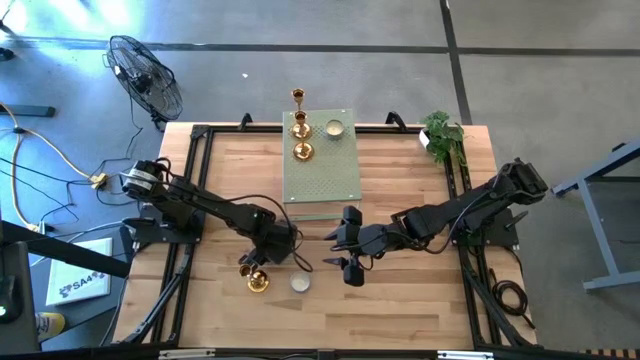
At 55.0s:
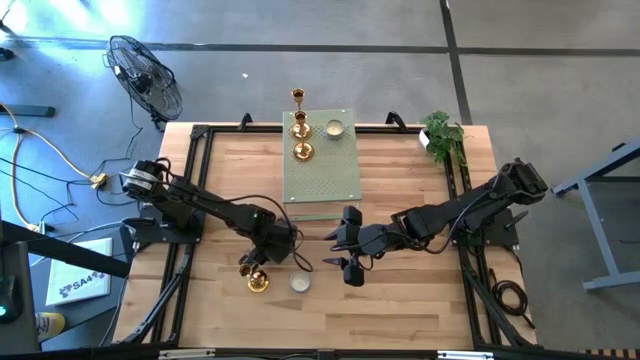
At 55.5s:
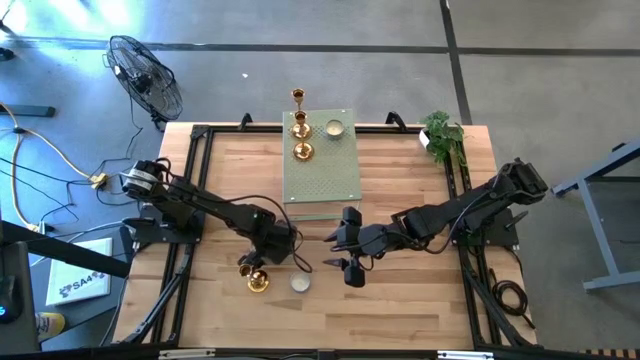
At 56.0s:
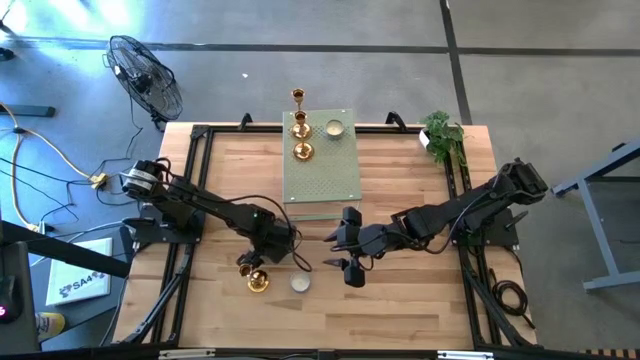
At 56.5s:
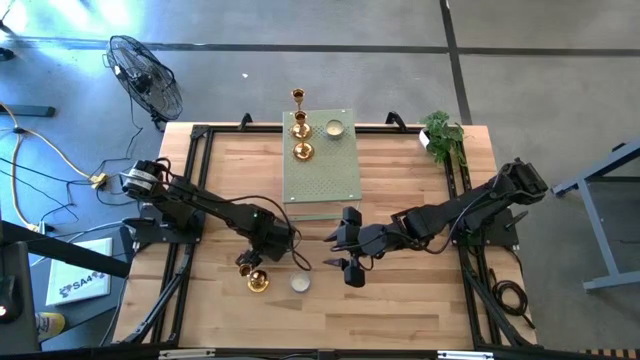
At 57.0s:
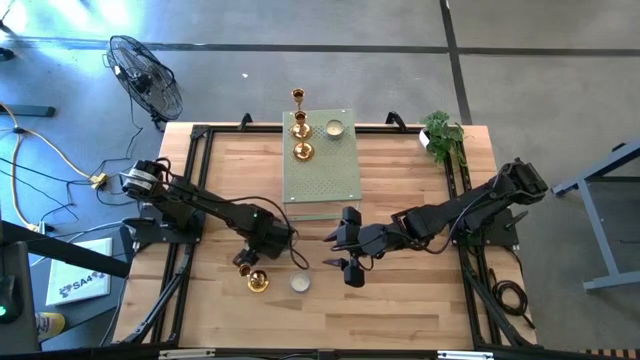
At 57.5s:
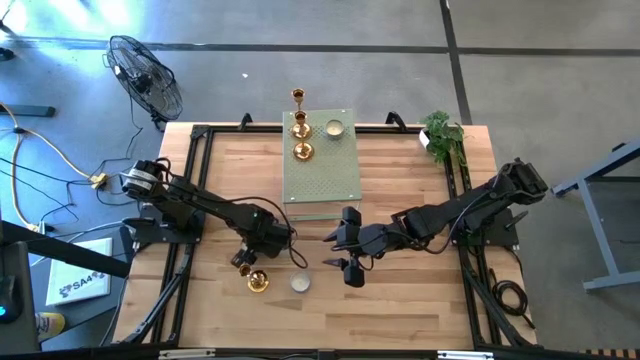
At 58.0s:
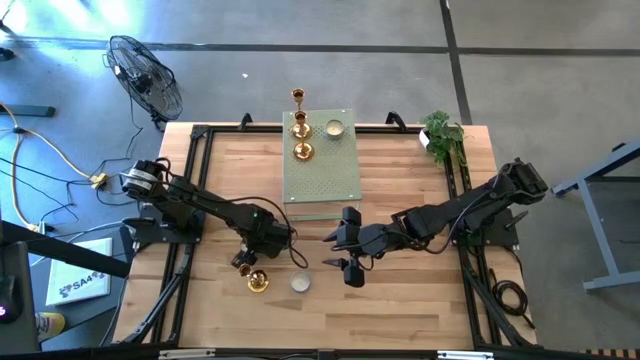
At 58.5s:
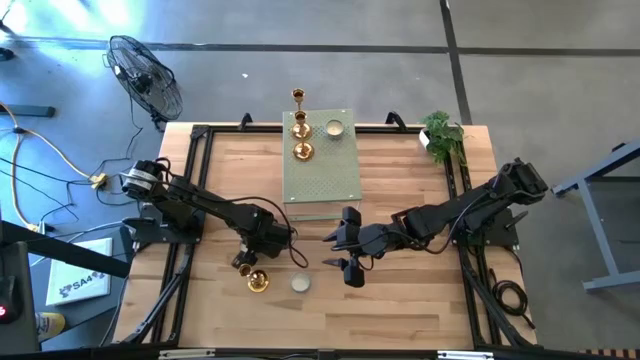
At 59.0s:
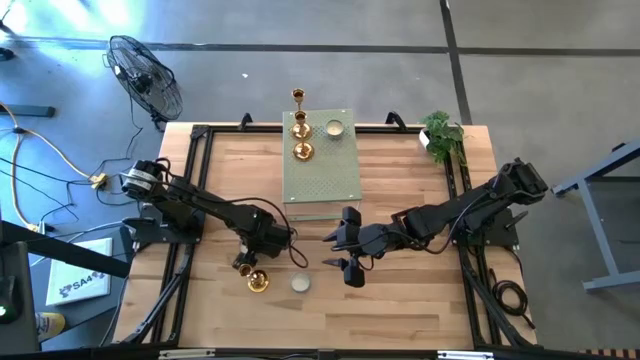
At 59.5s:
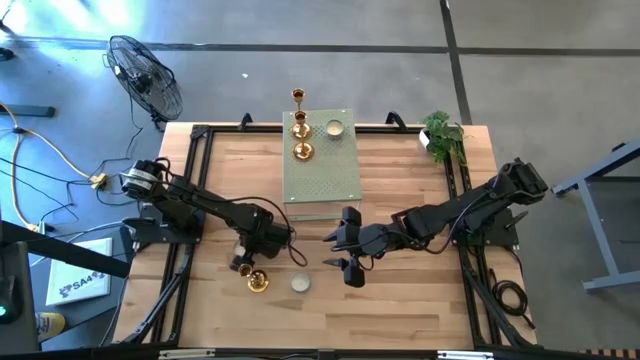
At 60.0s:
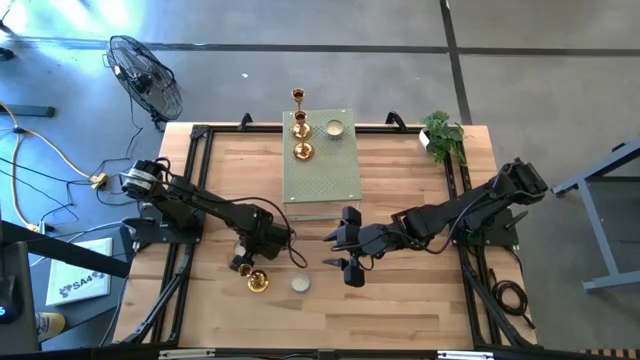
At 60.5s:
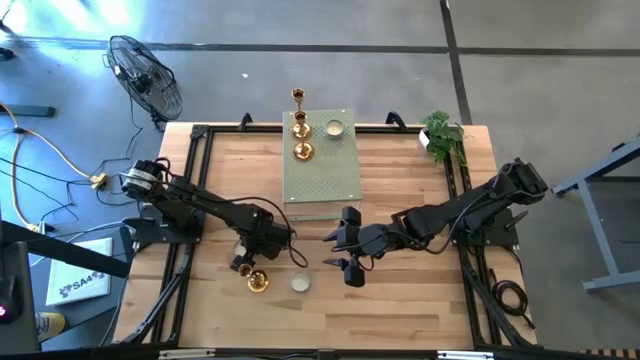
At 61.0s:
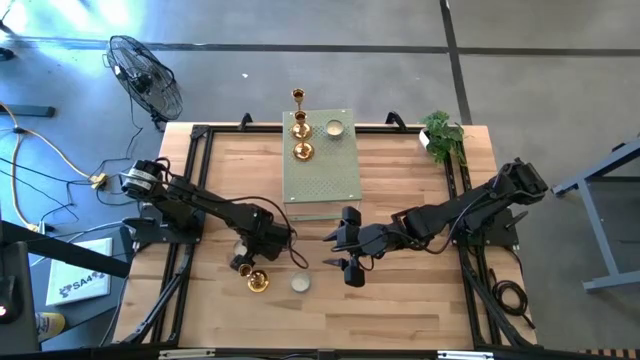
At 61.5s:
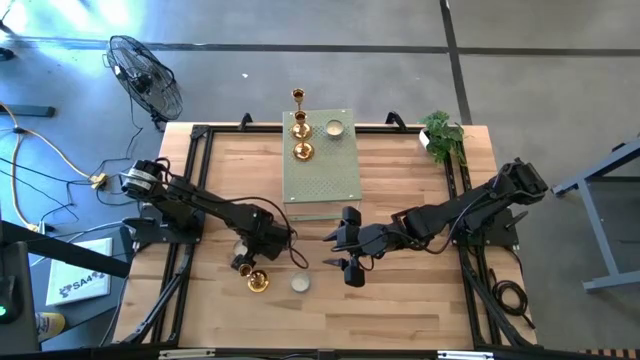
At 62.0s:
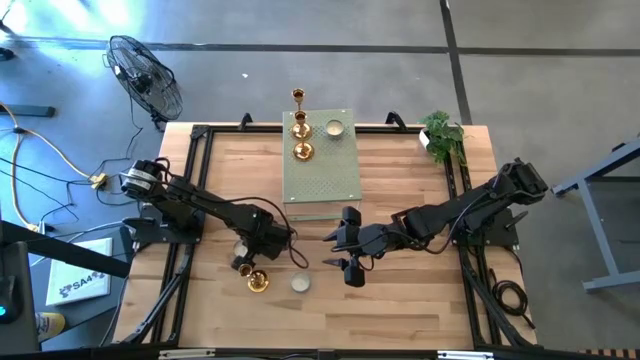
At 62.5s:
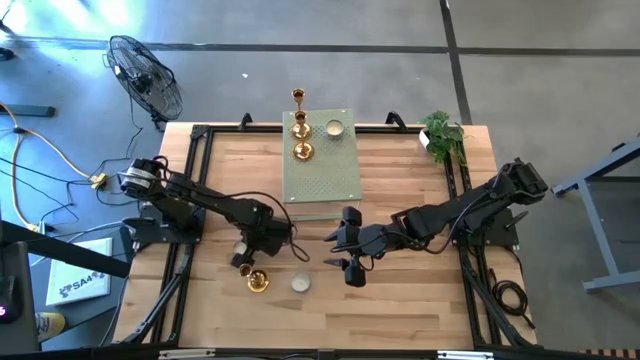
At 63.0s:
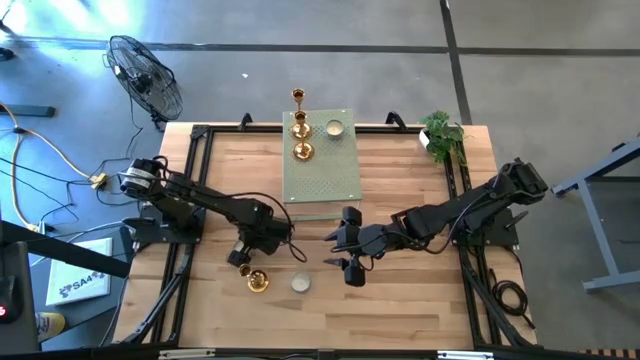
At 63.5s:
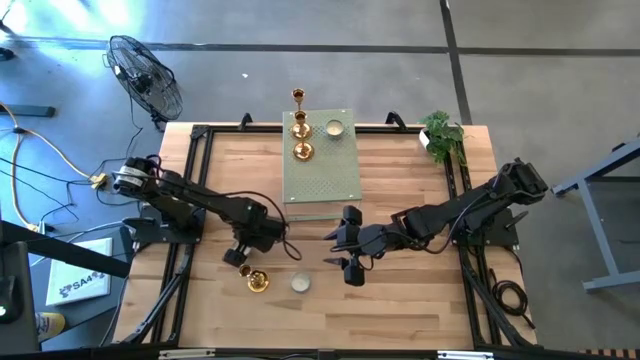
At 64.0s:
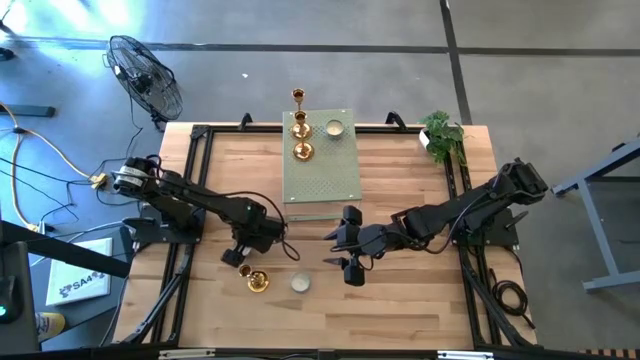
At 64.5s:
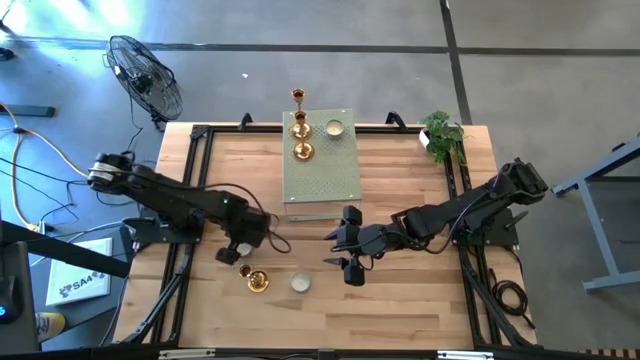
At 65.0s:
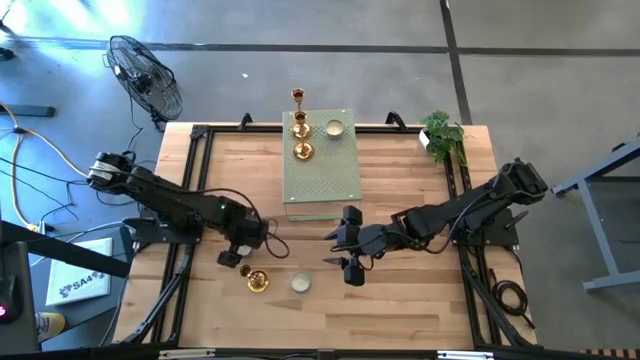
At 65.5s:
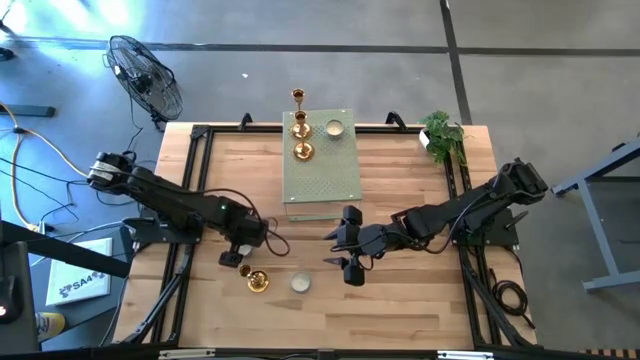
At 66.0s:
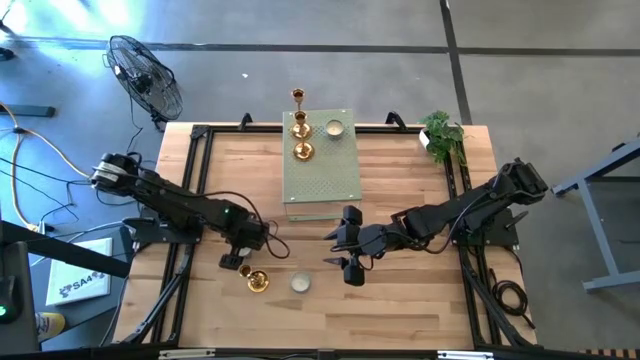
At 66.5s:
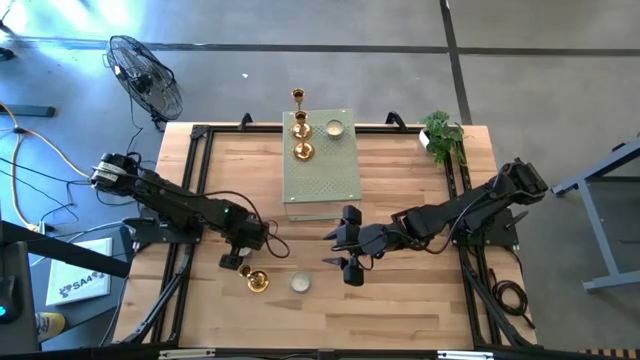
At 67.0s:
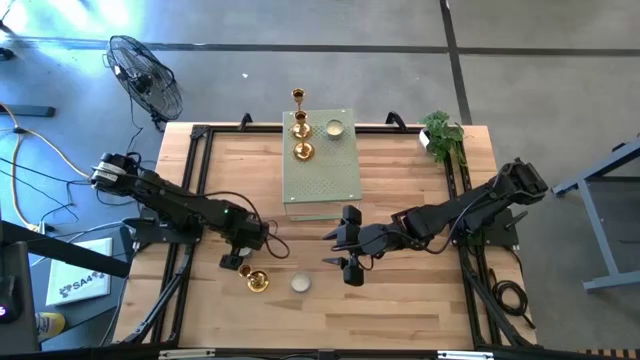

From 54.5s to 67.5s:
Task: Pick & Place candle stick holders
Put the top blue scented candle on the shelf aligned with the other blue scented candle

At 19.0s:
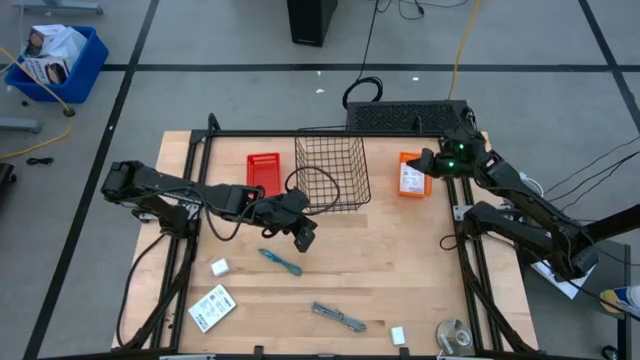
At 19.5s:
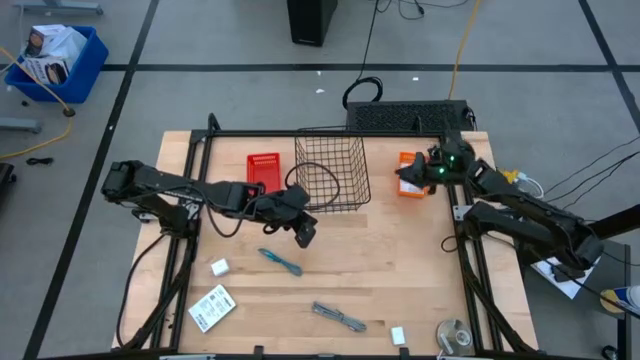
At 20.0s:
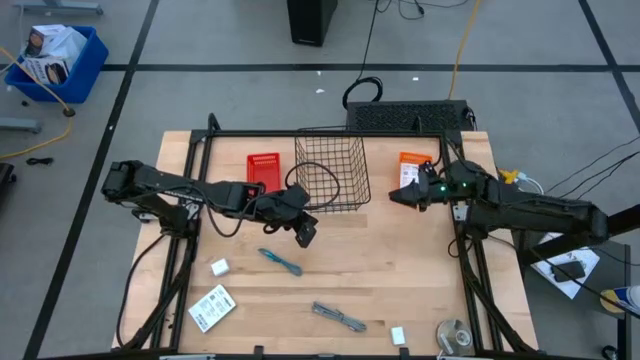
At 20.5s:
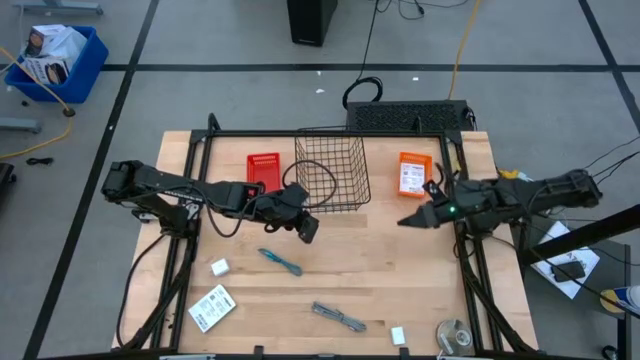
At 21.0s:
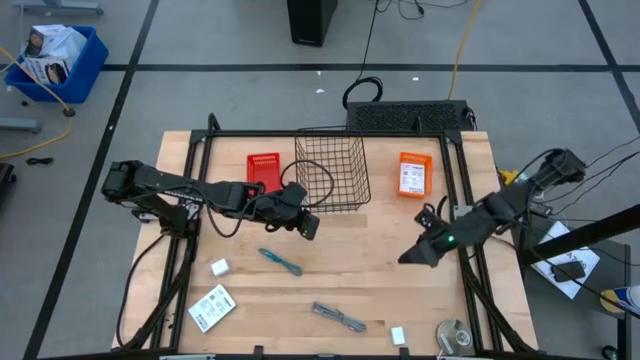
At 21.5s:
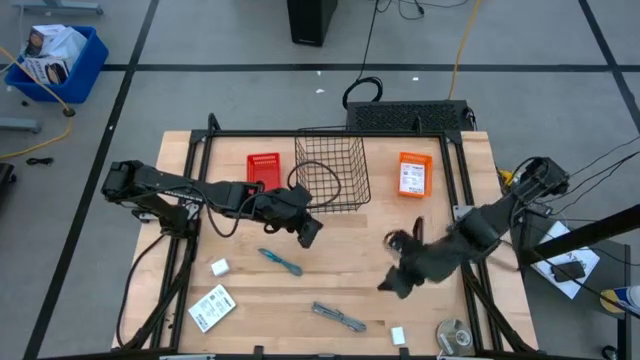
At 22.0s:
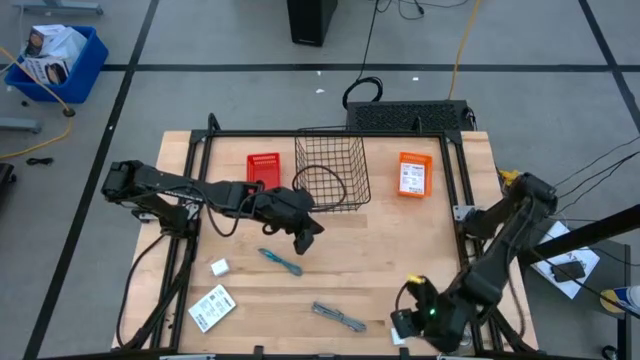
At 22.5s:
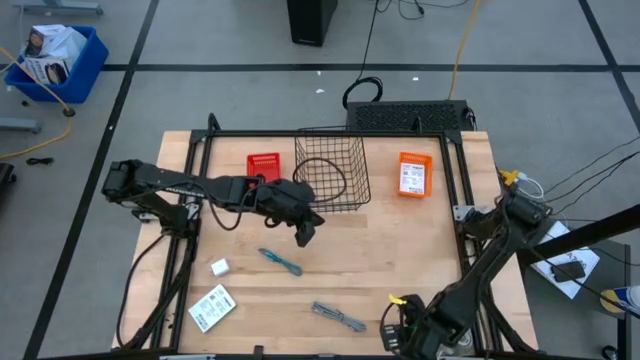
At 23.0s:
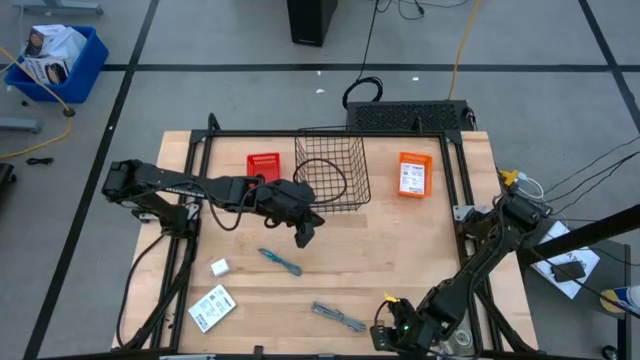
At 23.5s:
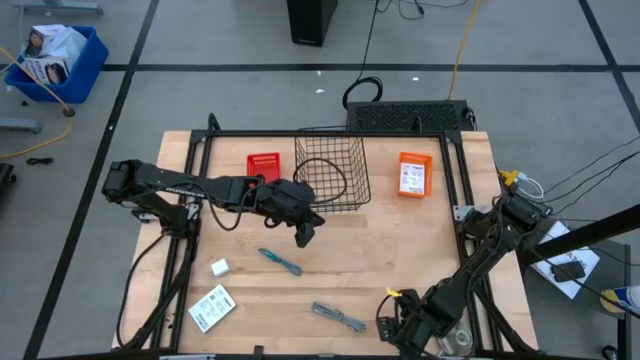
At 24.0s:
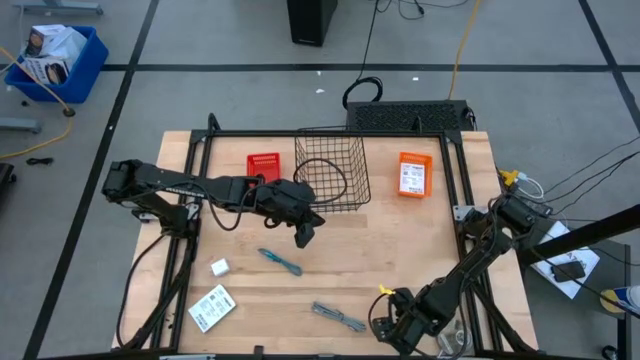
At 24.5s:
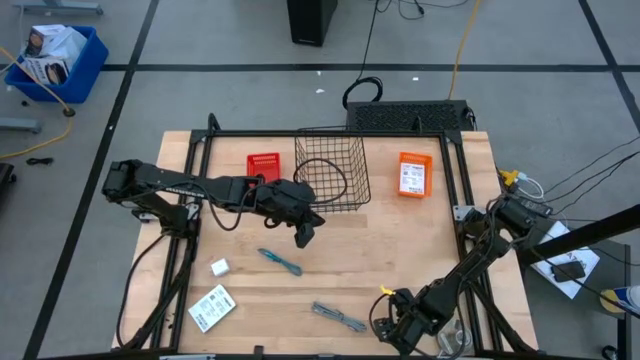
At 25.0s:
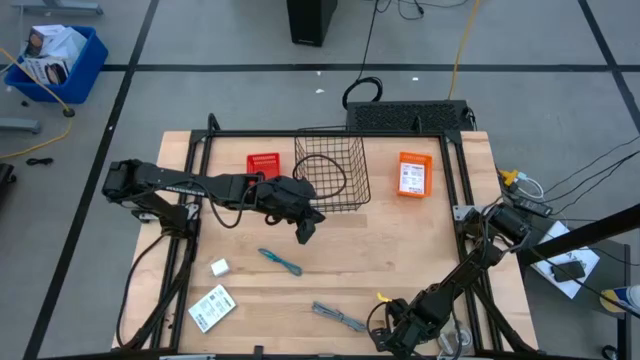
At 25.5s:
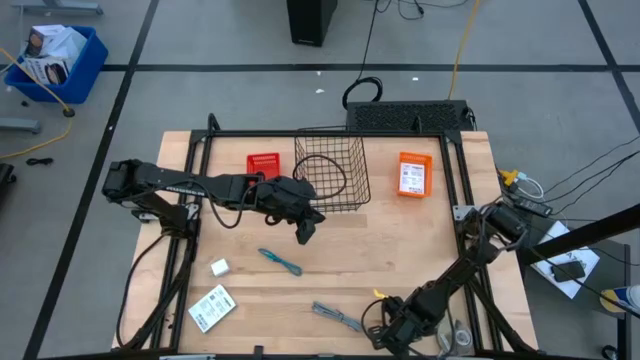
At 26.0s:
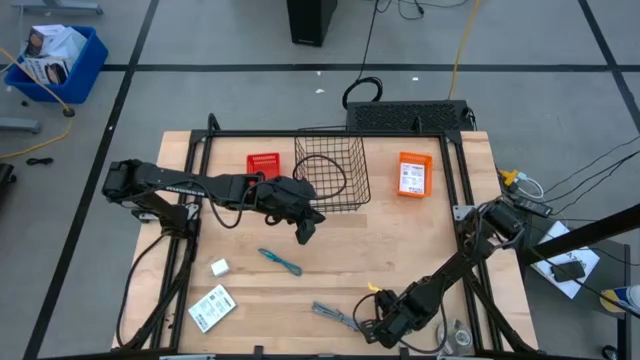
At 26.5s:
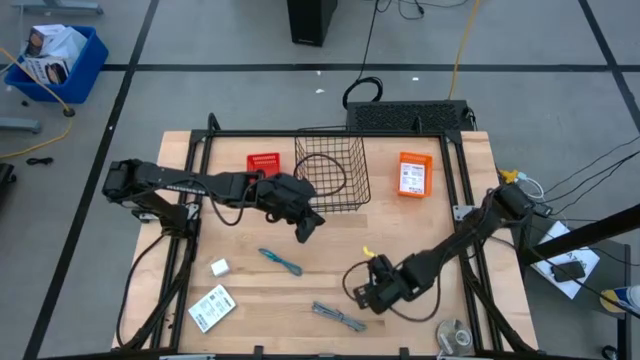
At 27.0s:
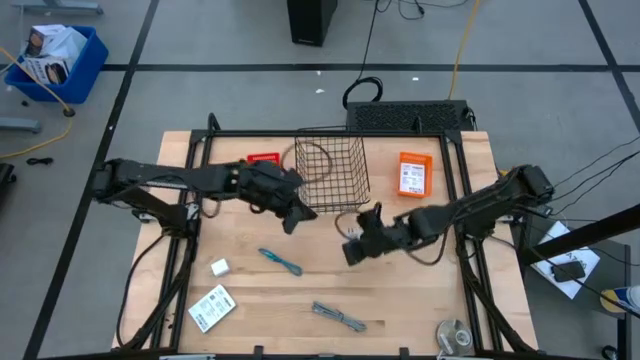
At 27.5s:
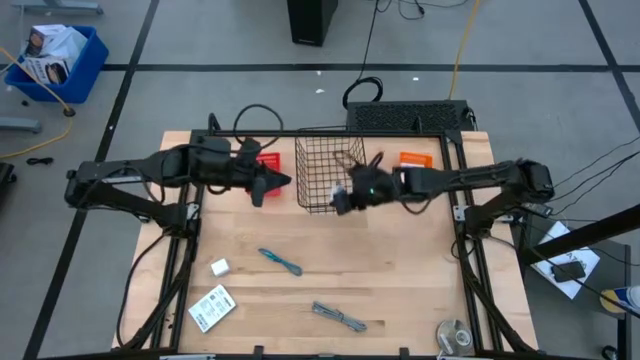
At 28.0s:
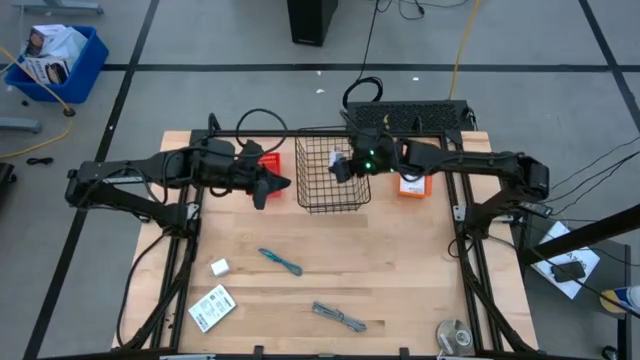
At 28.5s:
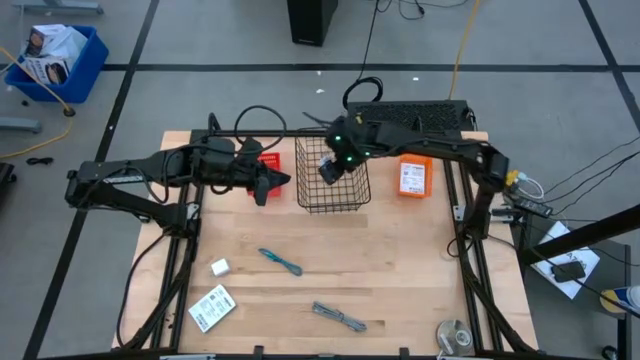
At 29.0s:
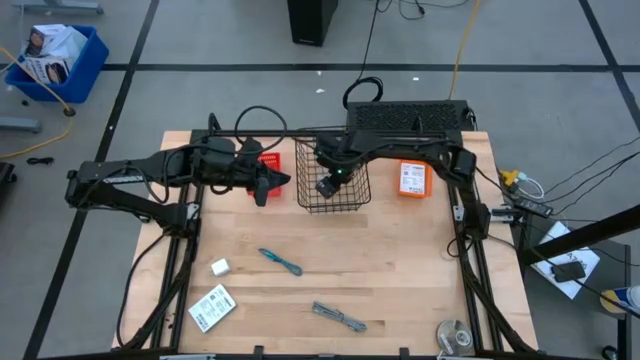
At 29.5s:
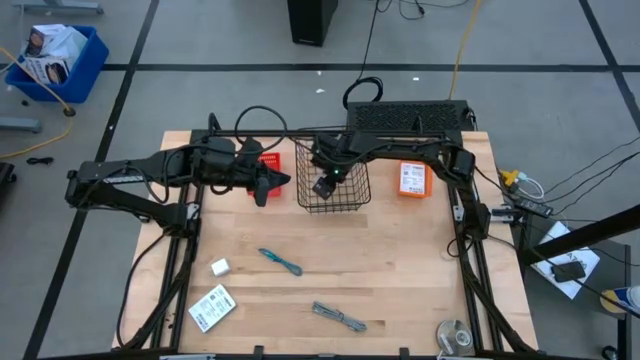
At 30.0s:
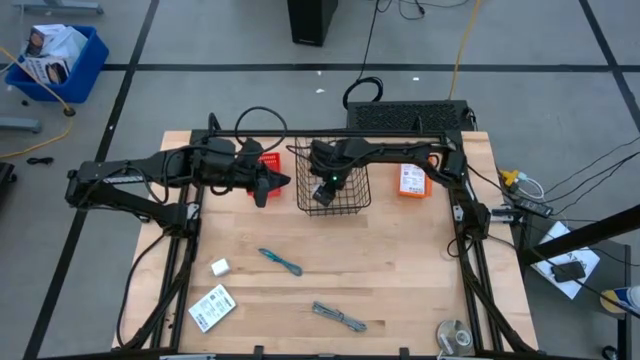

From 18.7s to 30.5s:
Task: Pick and place items into bin
Put the right white charger adaptor into the wire basket
